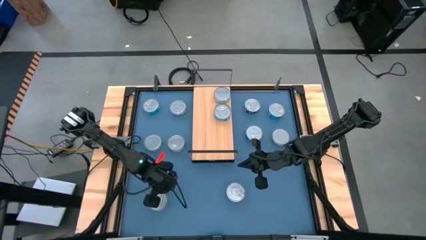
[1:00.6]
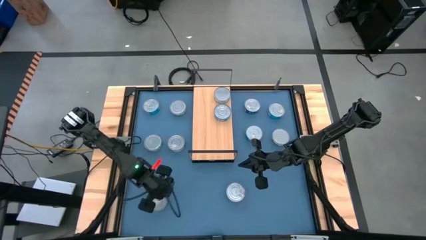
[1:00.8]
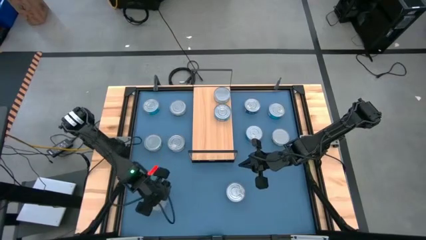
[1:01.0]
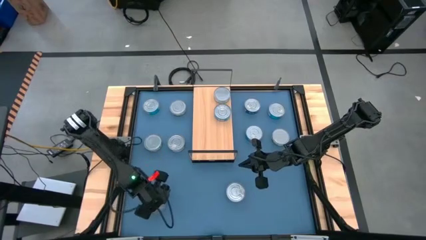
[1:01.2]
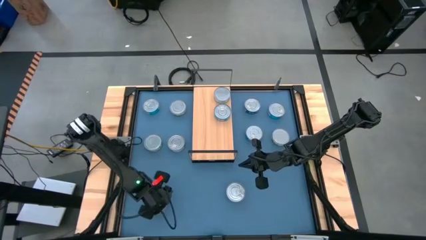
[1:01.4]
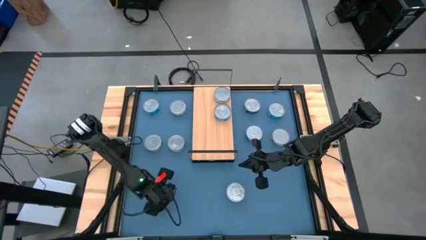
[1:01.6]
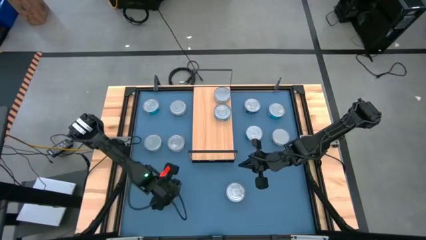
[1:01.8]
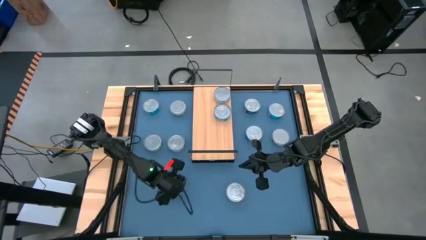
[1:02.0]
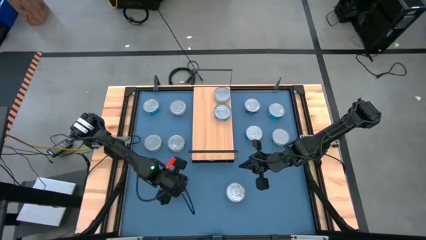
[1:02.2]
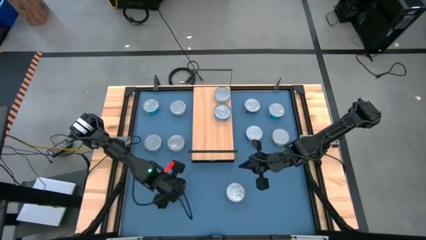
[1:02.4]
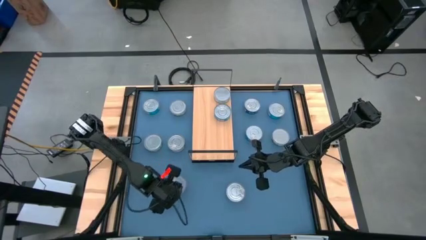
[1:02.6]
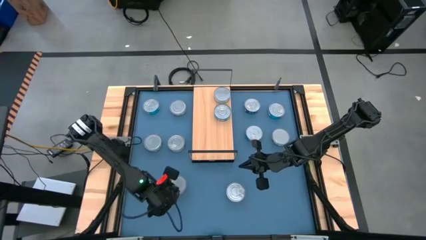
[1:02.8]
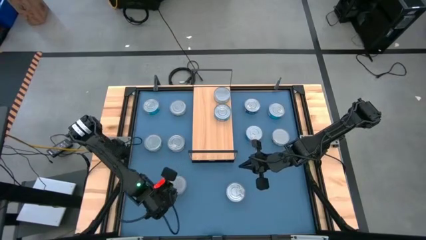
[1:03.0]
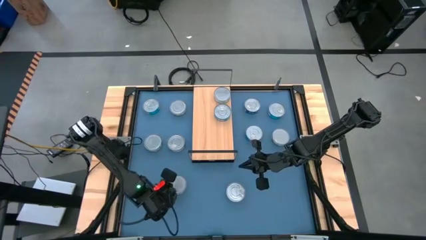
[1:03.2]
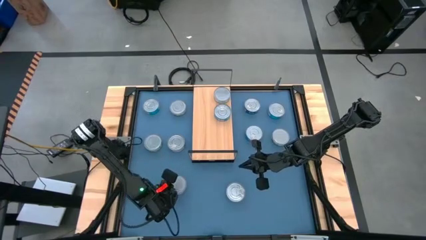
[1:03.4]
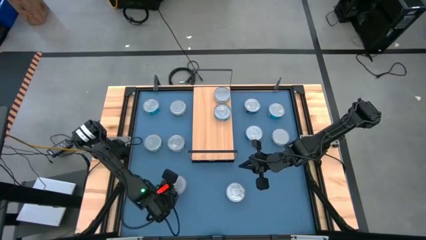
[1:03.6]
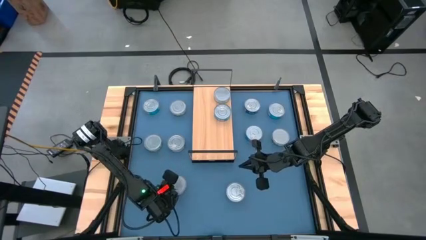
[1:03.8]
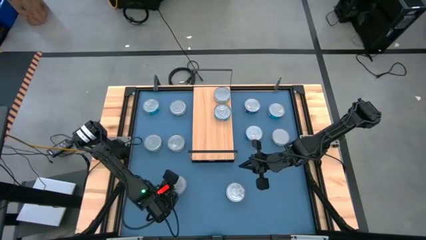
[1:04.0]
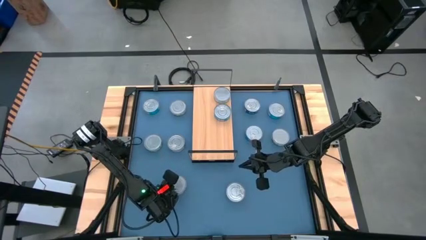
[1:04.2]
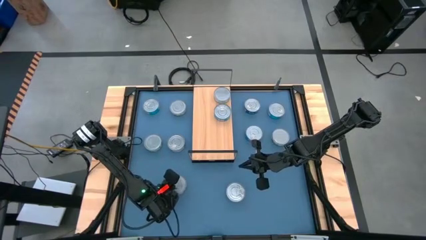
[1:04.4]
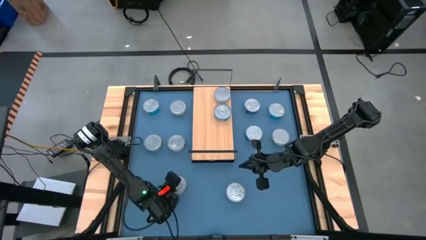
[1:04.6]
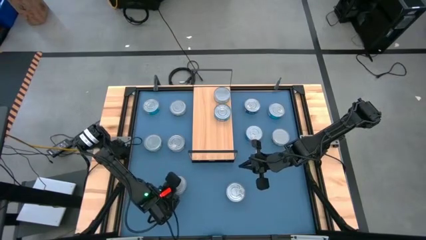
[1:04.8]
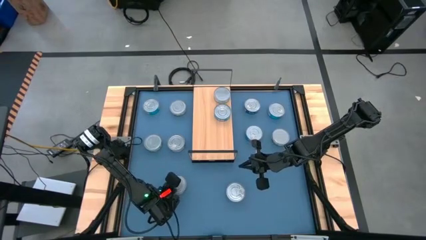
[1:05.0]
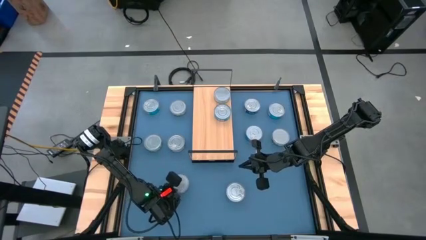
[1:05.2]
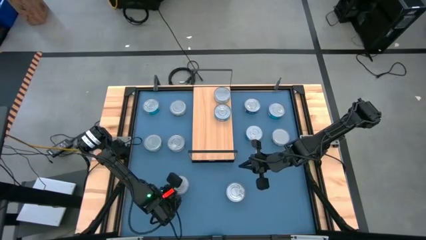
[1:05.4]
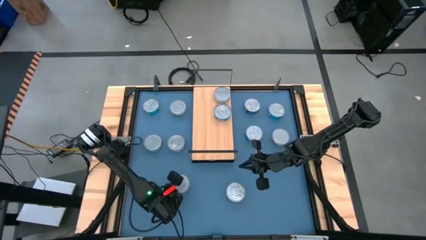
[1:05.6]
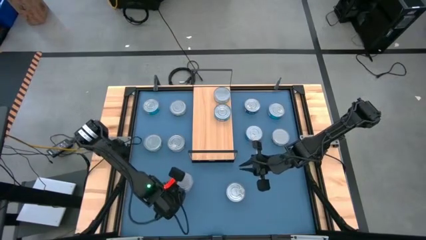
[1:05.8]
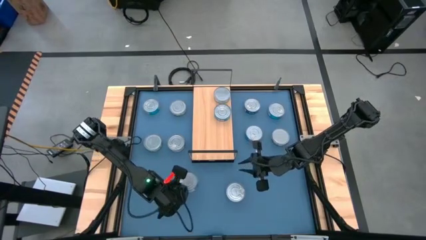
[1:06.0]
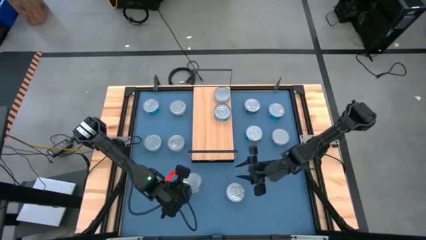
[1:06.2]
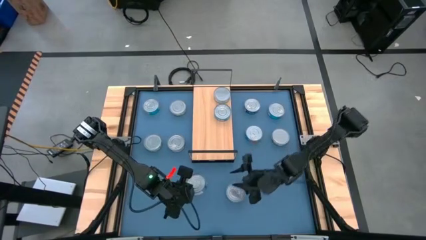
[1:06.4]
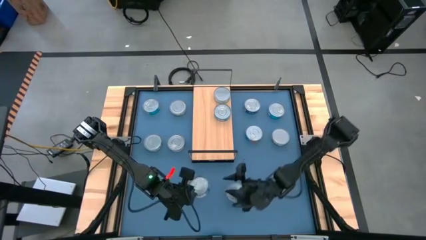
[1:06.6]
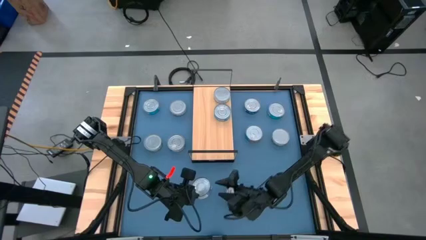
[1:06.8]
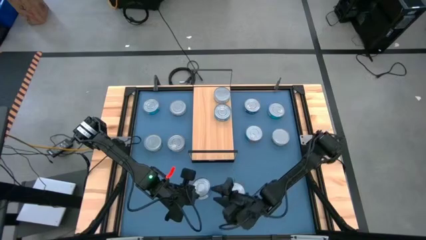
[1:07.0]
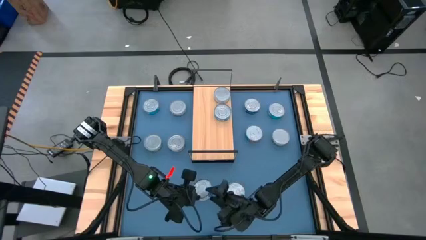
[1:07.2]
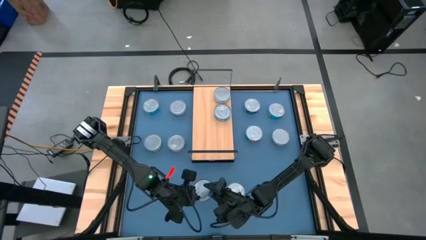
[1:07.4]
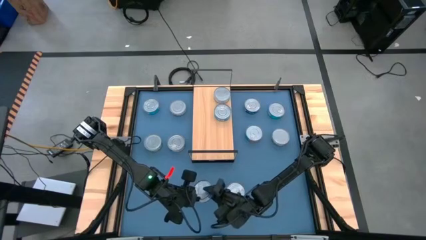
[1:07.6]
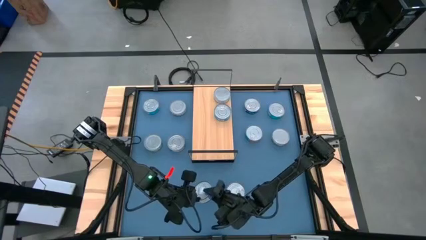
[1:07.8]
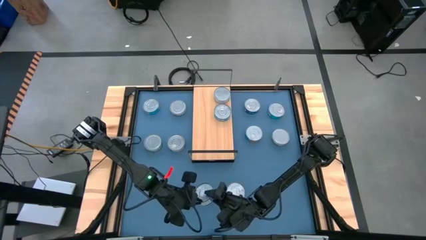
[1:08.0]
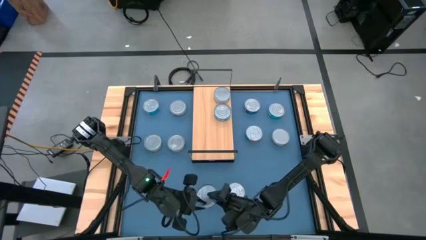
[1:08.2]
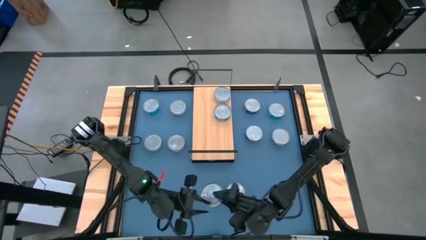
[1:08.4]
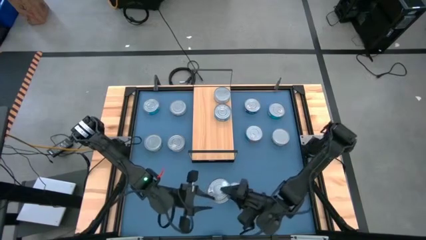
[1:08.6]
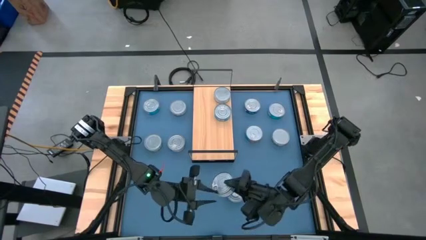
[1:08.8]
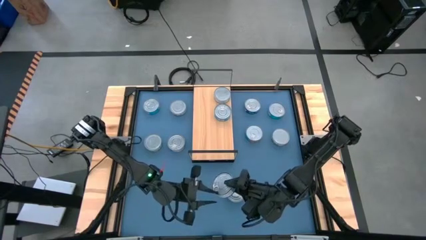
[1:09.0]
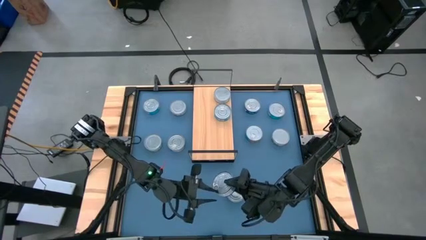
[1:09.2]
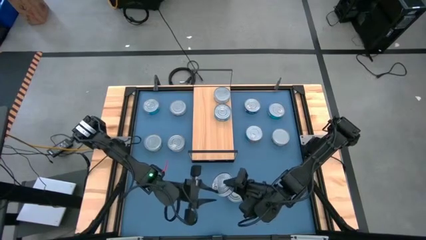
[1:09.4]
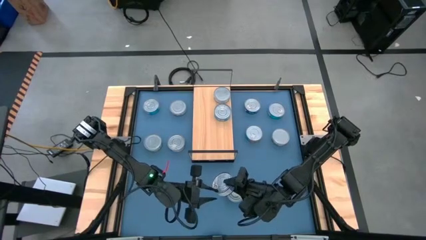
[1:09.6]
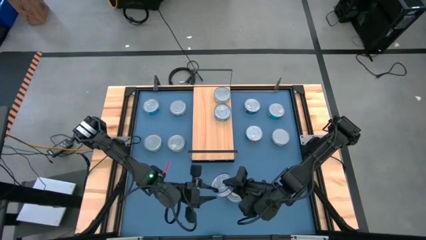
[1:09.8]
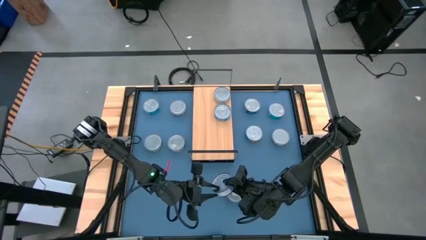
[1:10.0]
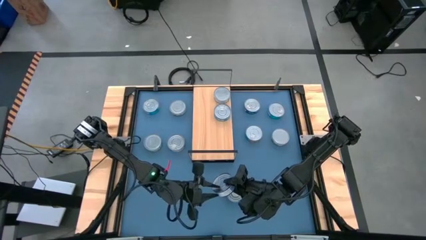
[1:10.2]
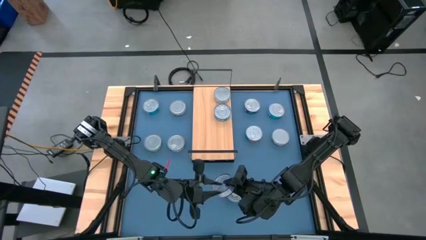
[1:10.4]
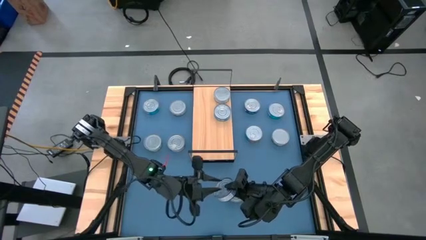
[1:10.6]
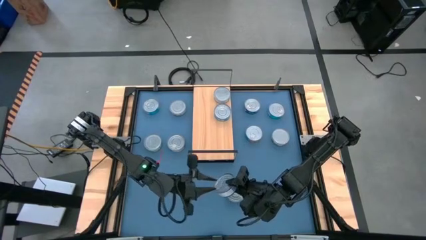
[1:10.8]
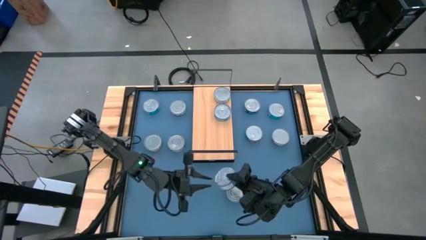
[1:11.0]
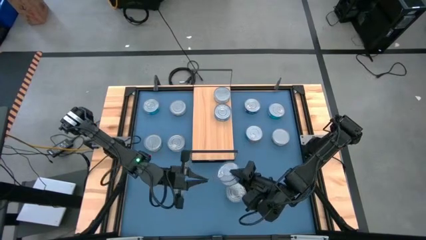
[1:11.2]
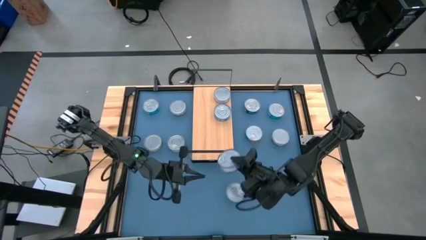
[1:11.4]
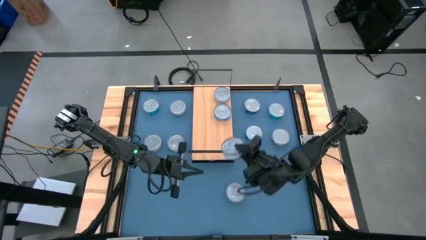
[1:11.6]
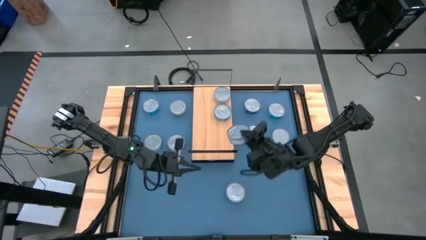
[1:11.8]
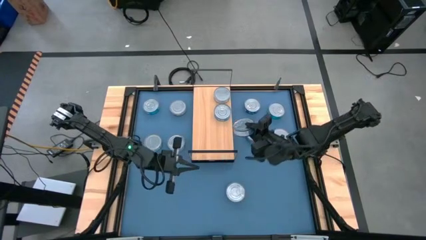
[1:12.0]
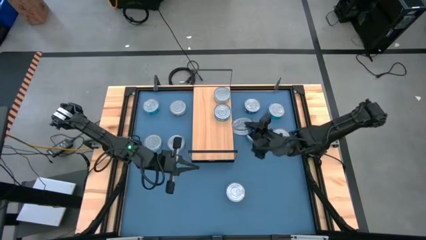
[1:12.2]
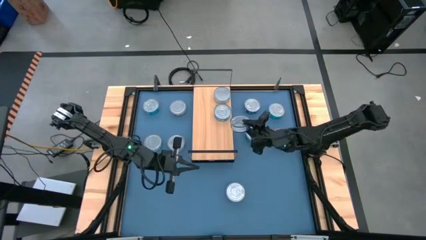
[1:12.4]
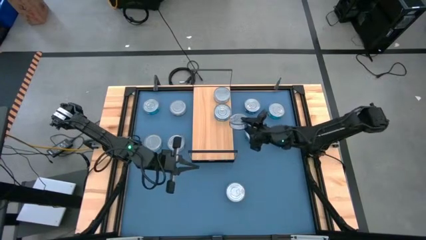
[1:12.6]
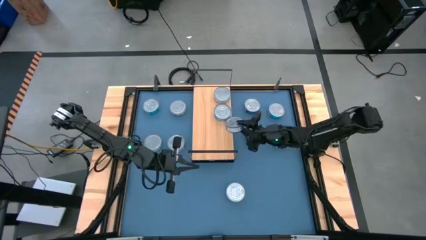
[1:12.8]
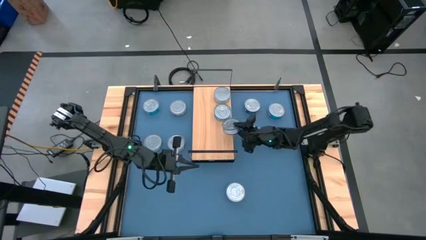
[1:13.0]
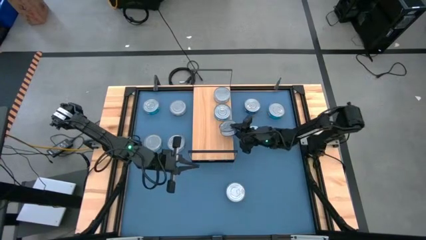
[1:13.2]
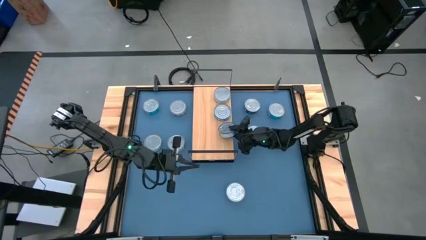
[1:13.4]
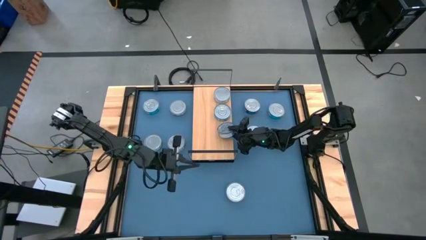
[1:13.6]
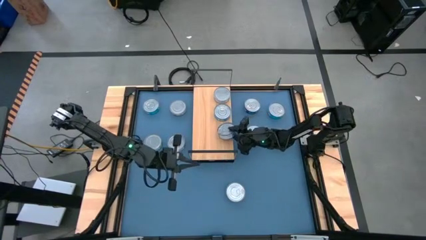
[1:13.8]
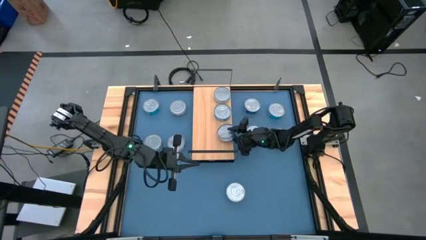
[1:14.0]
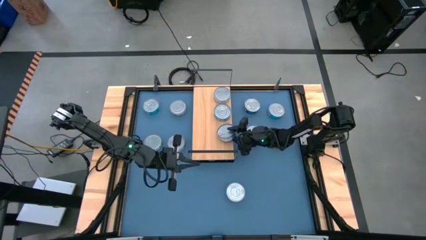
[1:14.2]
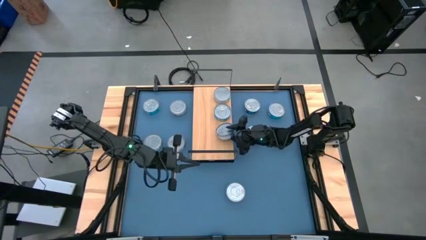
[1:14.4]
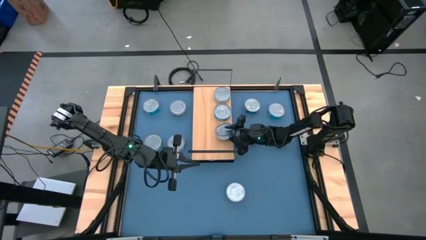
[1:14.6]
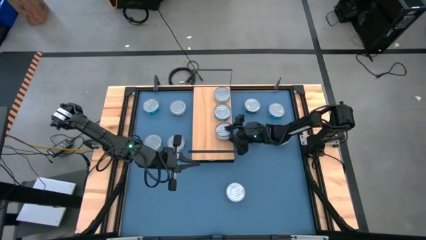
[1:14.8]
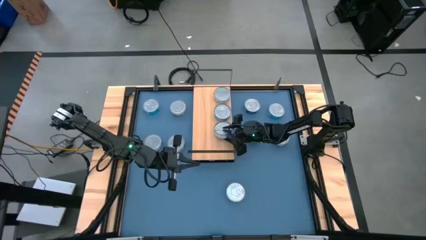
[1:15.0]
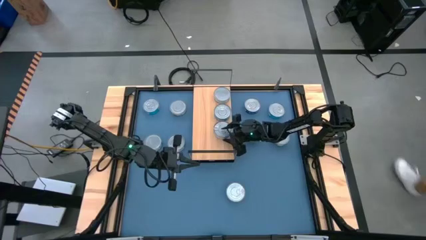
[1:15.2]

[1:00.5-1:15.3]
Task: Stack canned seafood by type on shelf
Put the blue tuna can on the shelf
